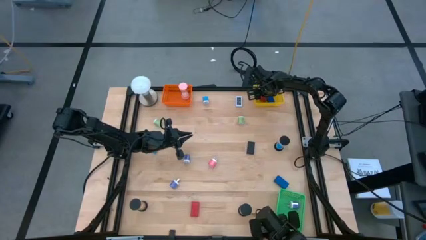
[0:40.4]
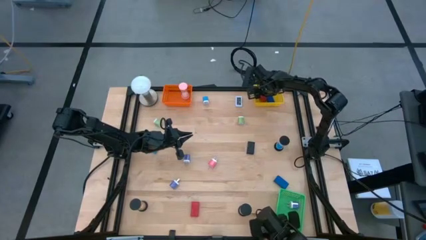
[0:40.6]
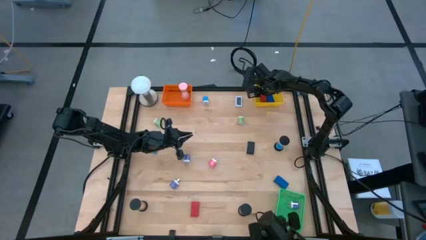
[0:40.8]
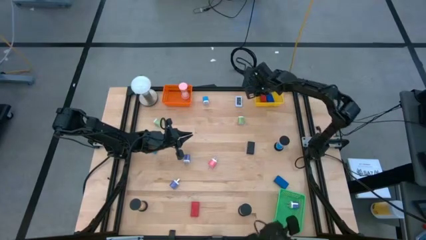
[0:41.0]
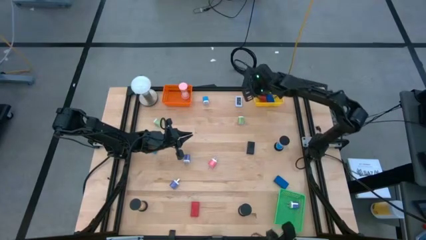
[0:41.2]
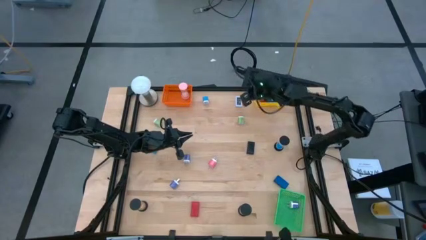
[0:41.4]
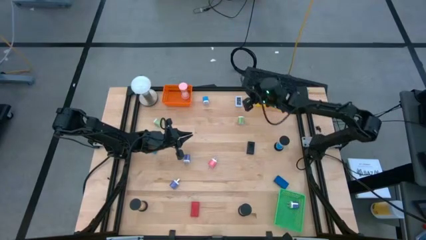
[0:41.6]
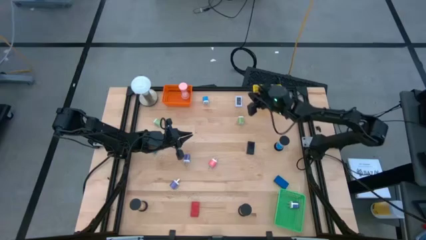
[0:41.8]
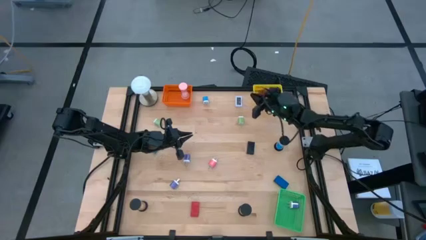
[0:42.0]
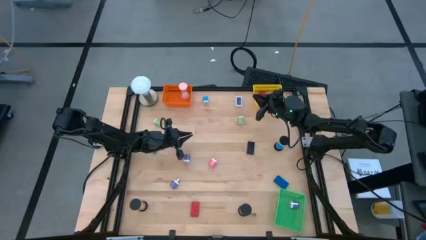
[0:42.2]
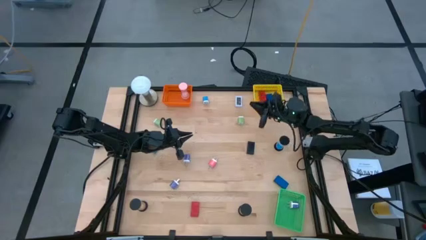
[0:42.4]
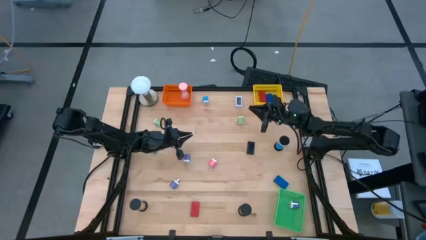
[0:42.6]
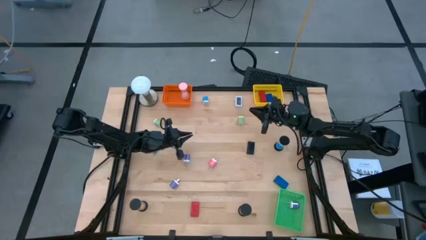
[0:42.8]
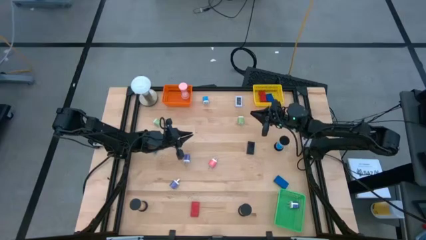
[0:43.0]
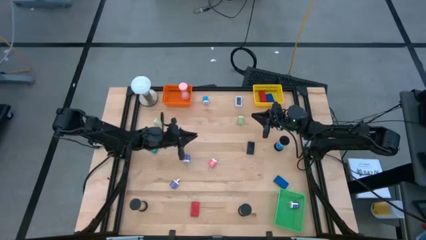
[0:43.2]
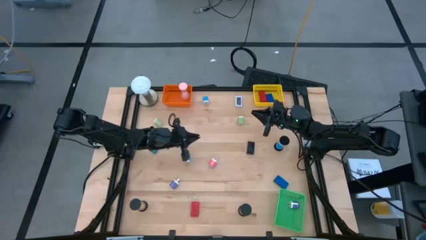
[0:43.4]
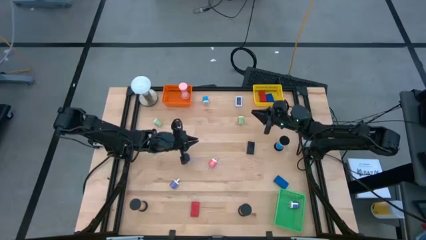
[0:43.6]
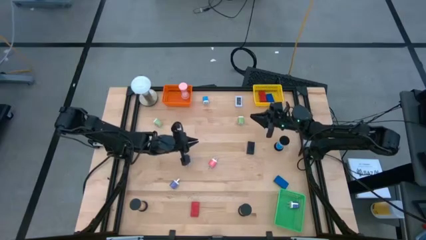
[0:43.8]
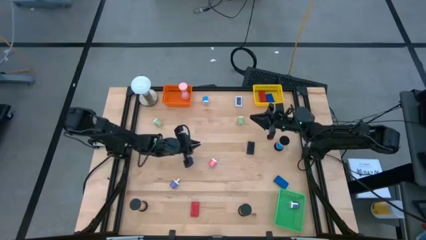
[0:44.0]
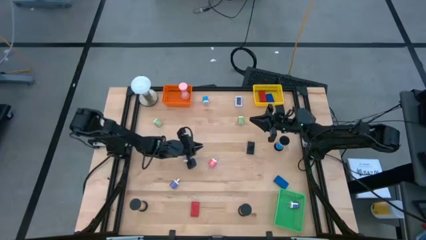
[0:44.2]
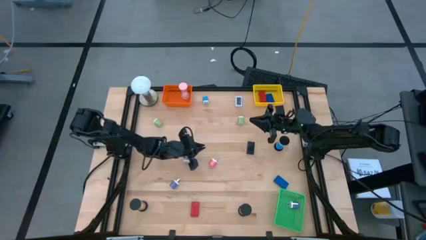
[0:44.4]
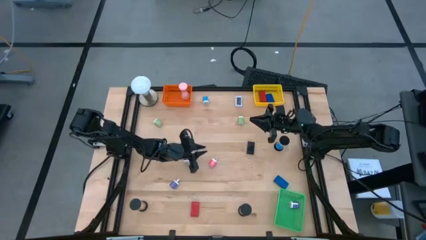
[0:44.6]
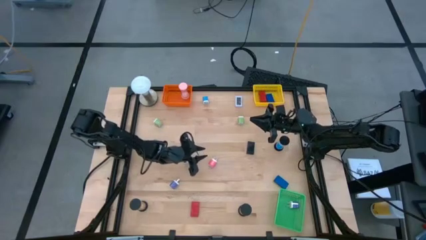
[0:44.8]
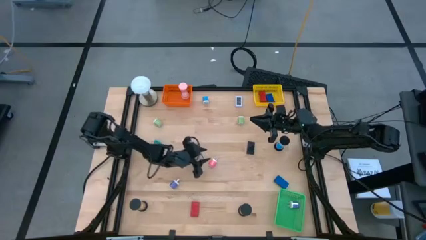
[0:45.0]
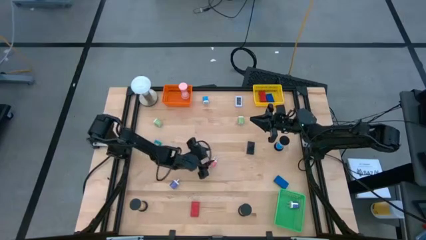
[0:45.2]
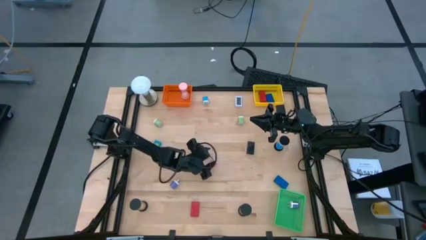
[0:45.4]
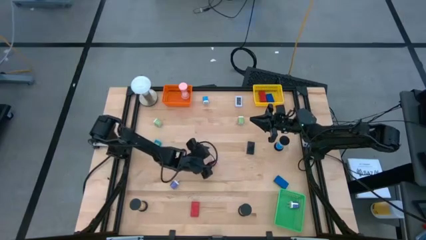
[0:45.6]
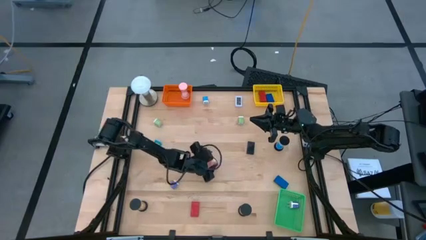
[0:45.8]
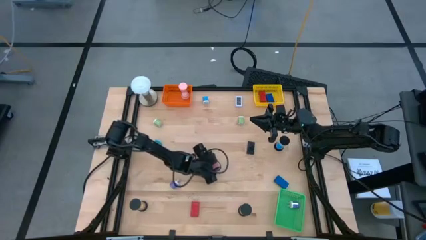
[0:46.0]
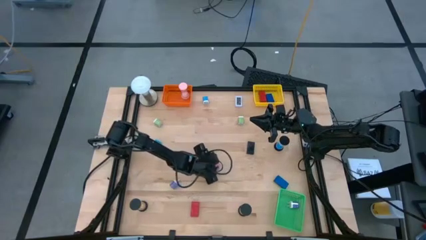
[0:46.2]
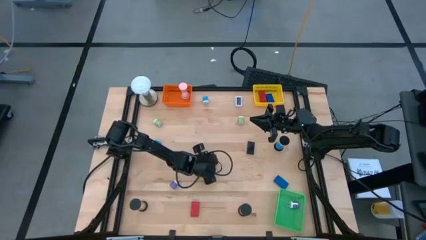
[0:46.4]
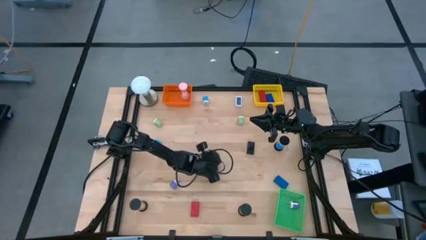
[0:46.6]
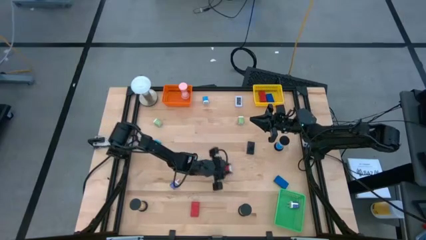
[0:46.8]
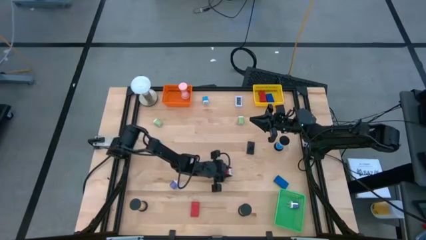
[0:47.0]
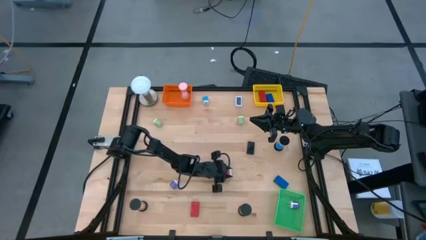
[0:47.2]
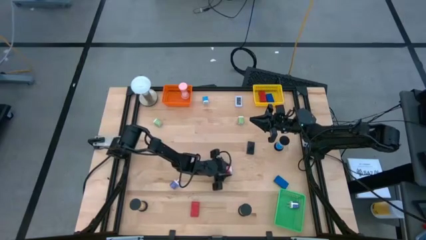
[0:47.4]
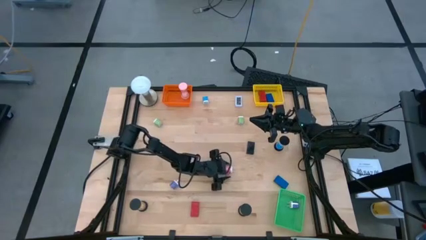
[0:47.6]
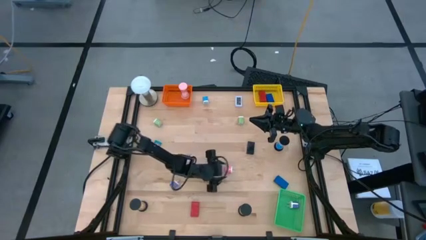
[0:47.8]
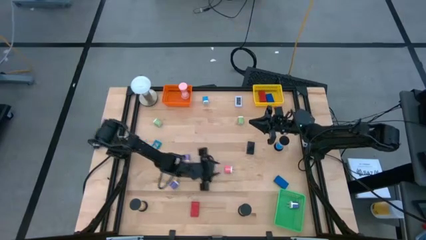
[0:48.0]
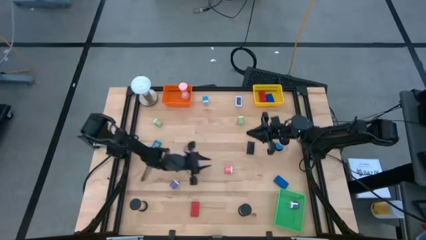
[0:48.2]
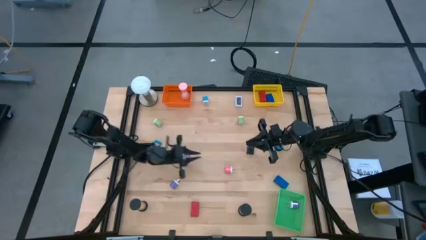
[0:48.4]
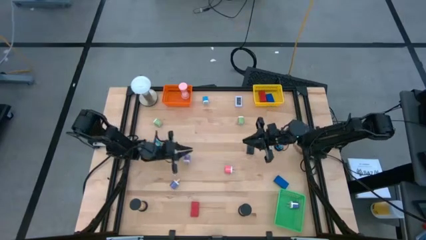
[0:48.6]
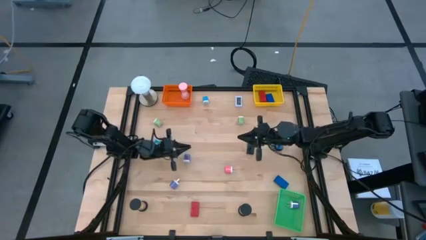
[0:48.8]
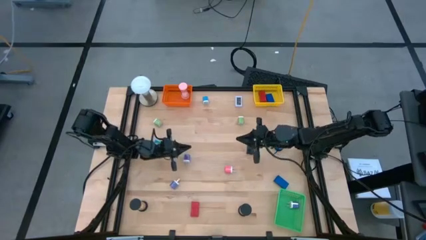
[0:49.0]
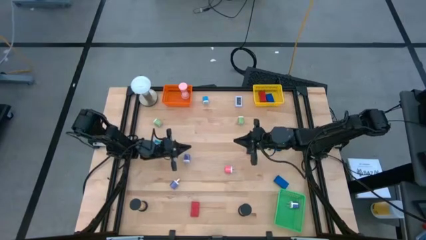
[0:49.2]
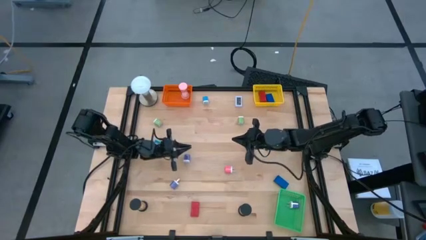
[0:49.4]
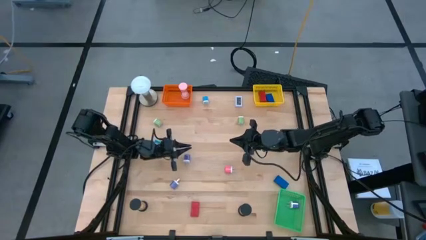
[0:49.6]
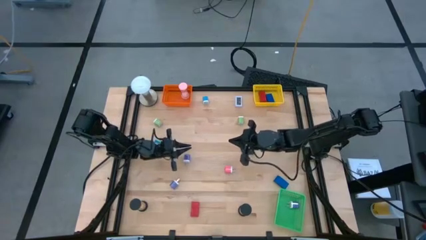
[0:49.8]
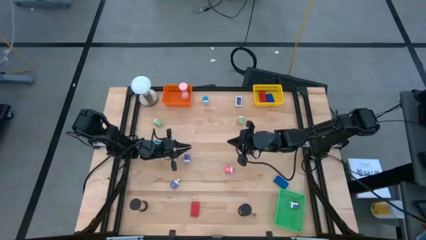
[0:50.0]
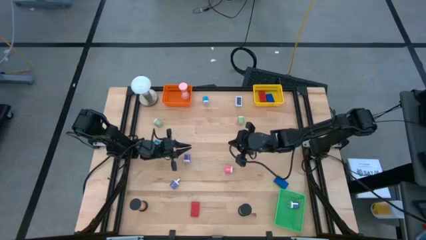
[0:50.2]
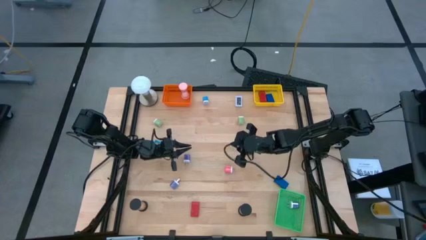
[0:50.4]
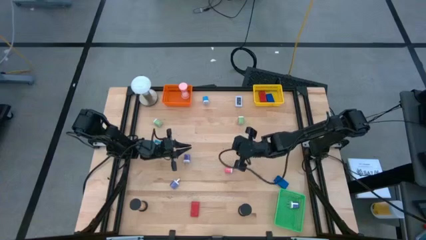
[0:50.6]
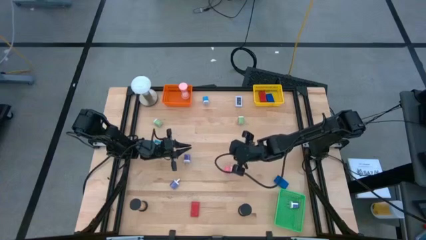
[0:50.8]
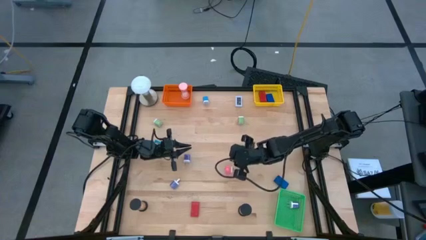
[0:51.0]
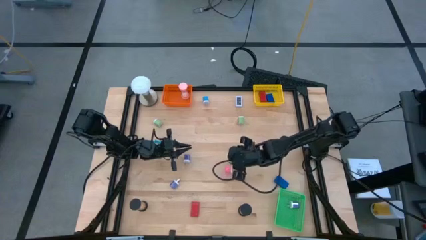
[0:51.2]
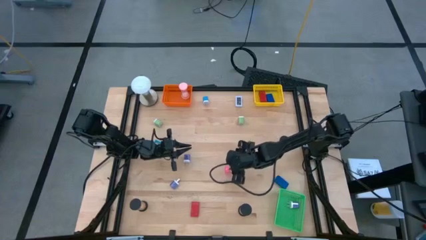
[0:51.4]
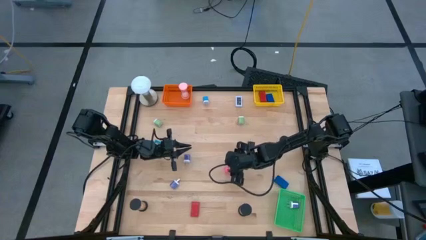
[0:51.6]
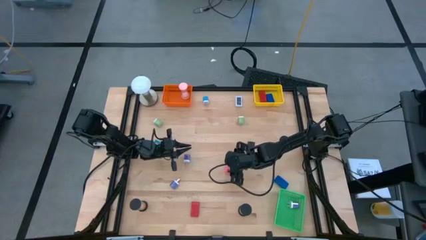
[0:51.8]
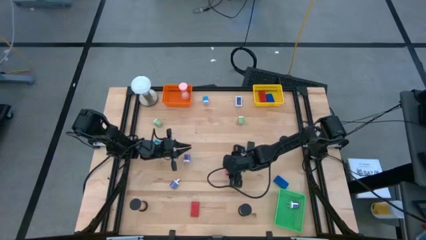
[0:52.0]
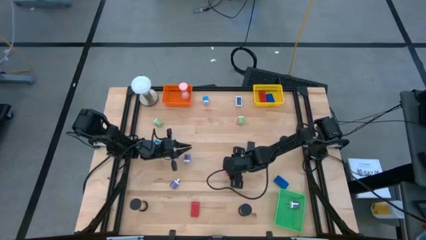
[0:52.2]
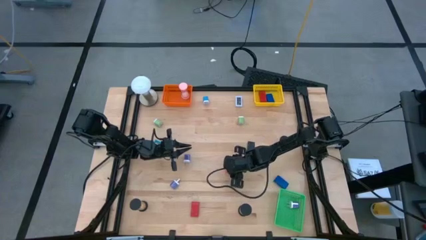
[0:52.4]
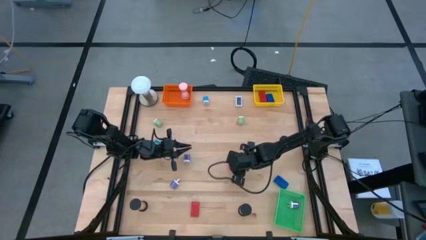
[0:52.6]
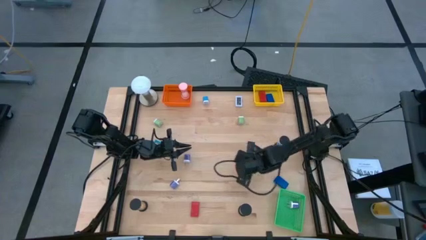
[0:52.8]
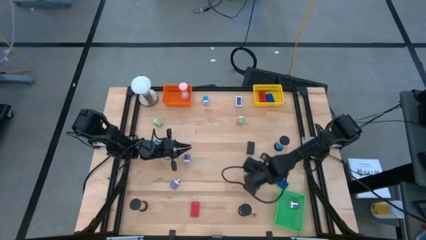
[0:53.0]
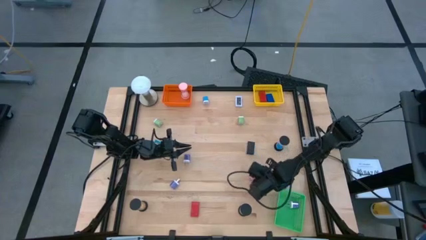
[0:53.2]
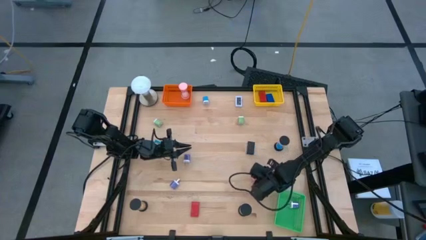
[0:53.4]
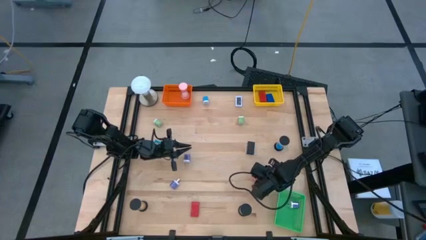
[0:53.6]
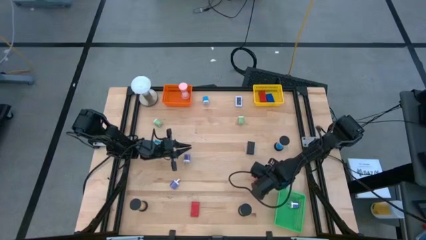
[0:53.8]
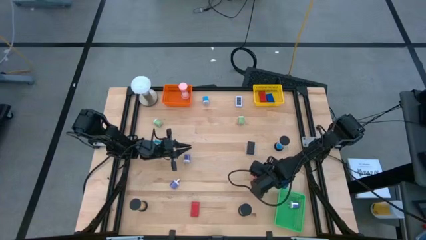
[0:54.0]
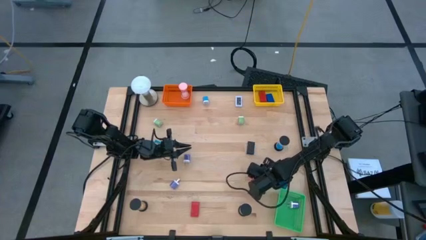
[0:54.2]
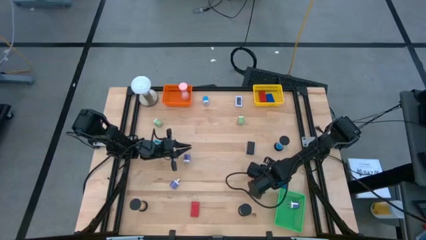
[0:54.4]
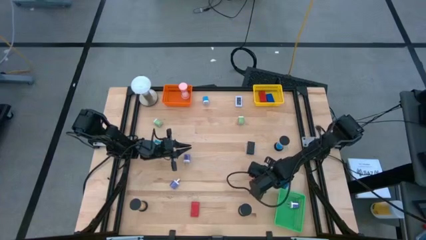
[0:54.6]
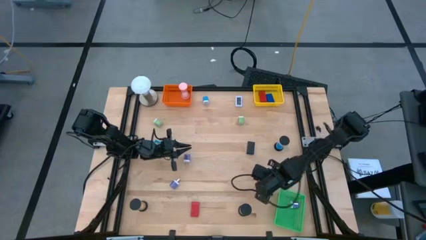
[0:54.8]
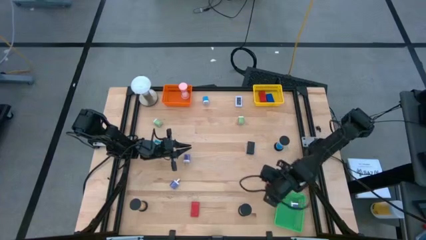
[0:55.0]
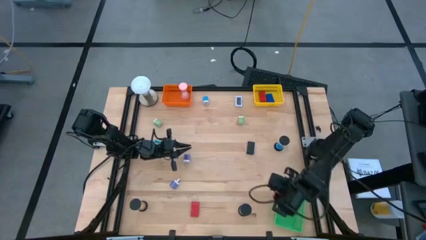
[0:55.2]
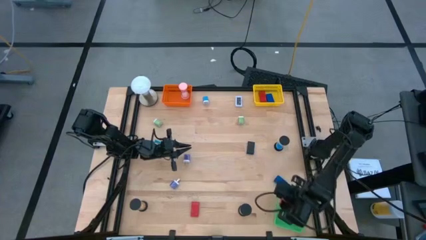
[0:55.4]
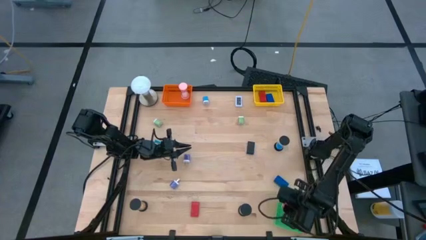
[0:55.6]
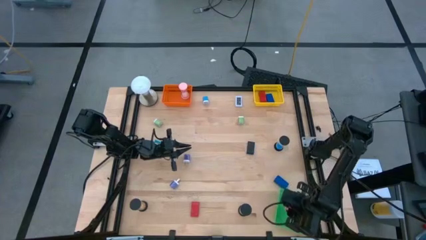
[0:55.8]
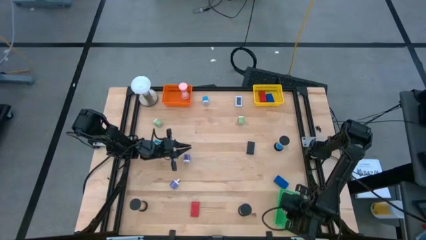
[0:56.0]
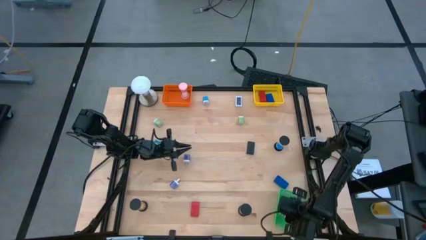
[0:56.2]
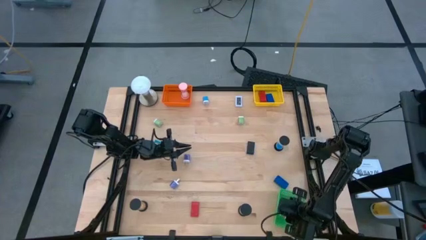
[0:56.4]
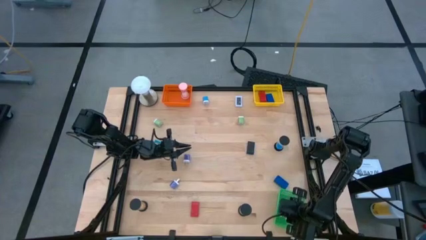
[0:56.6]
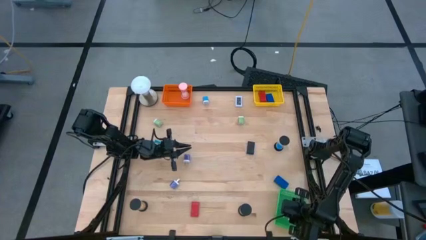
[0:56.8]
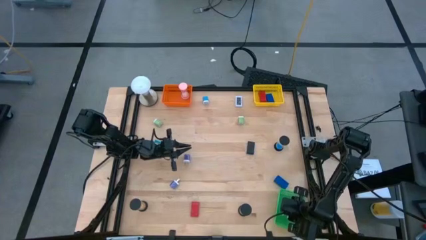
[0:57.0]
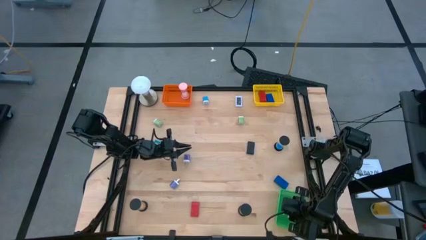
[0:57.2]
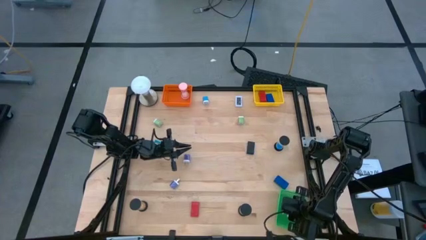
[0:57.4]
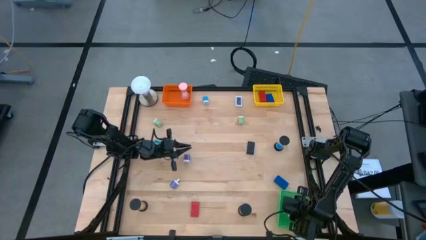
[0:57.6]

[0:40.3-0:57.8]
Task: Pick & Place Office items
Put the pink charger adapter into the green basket
